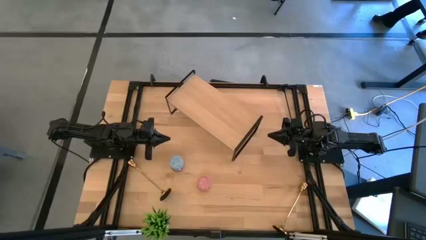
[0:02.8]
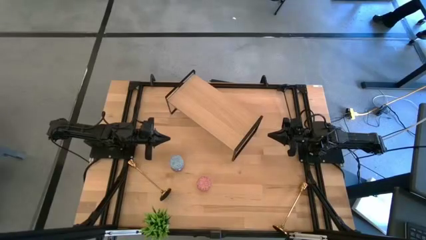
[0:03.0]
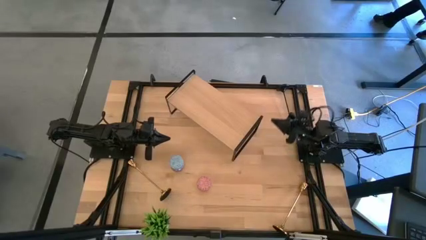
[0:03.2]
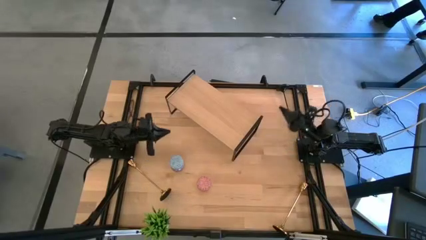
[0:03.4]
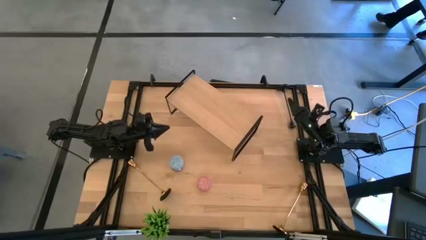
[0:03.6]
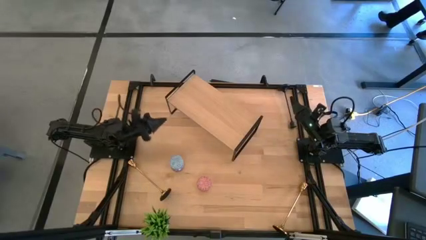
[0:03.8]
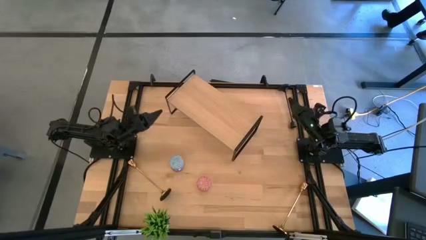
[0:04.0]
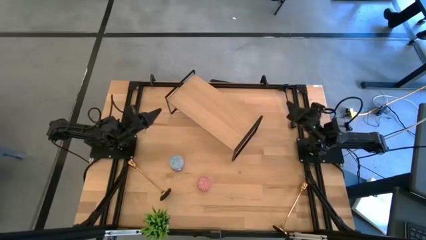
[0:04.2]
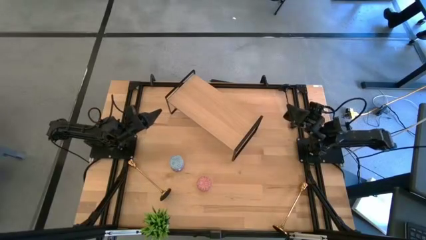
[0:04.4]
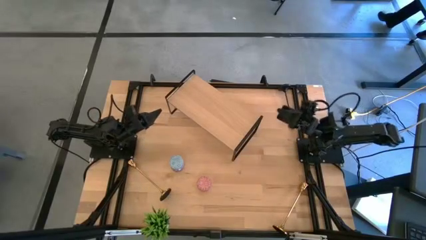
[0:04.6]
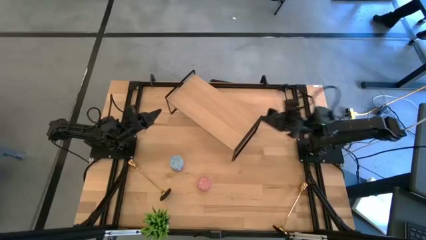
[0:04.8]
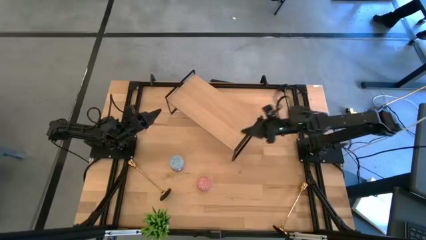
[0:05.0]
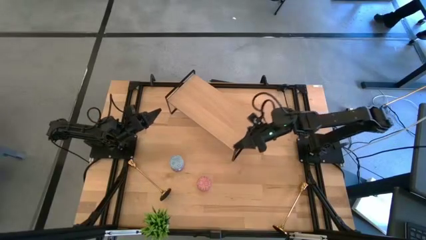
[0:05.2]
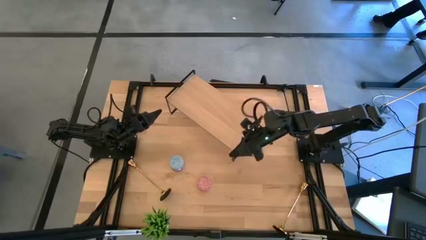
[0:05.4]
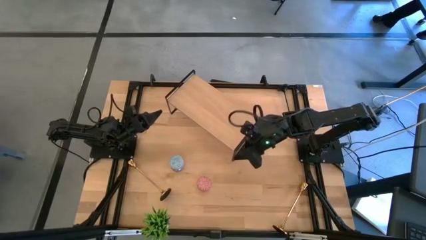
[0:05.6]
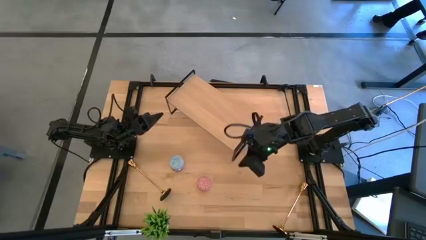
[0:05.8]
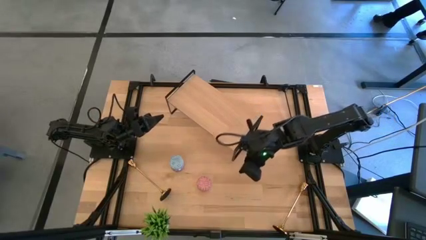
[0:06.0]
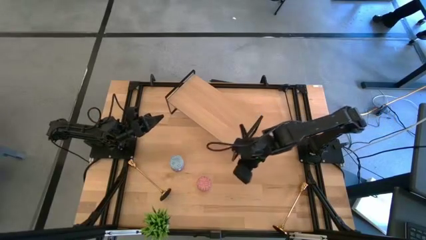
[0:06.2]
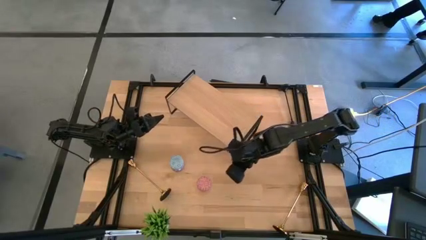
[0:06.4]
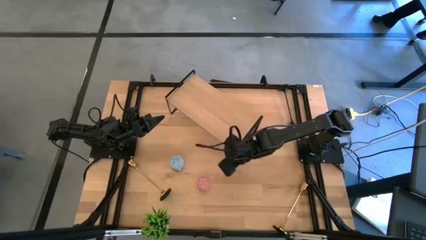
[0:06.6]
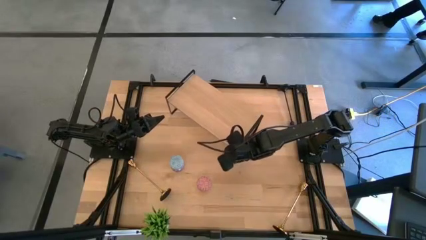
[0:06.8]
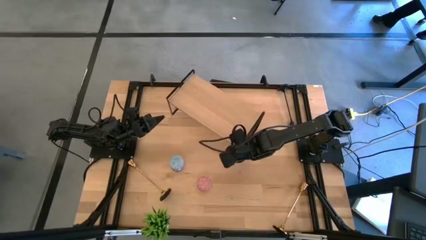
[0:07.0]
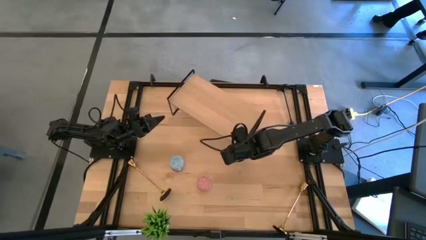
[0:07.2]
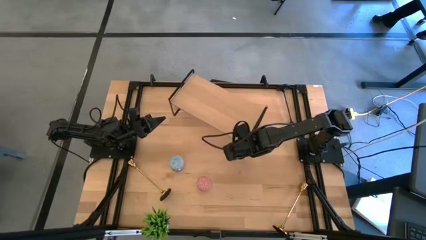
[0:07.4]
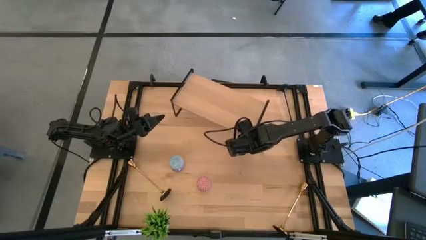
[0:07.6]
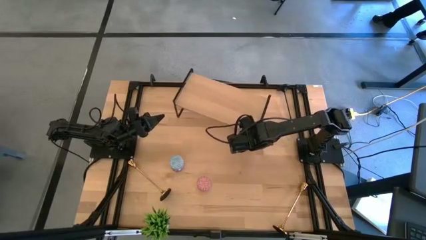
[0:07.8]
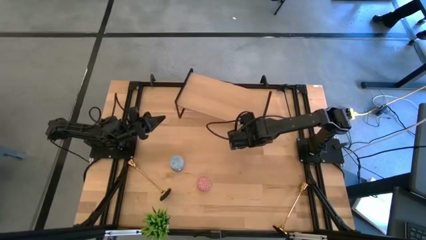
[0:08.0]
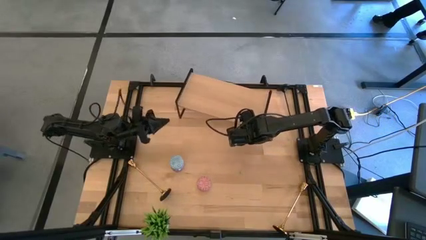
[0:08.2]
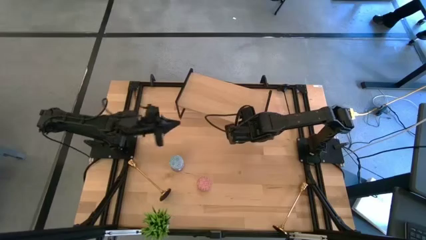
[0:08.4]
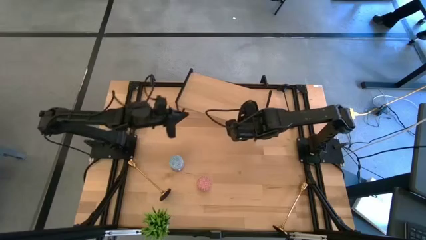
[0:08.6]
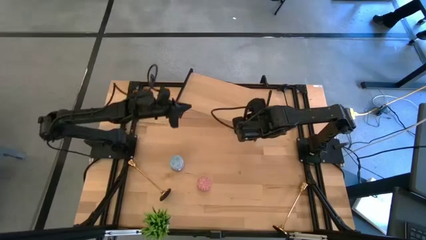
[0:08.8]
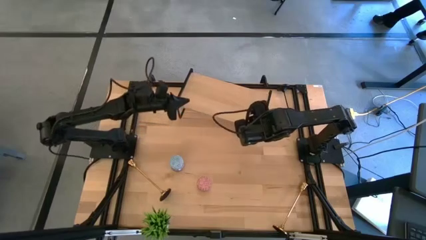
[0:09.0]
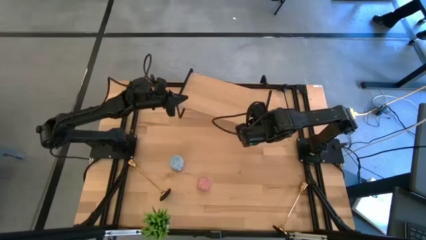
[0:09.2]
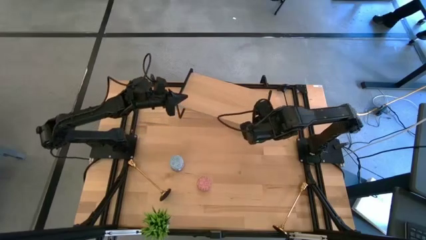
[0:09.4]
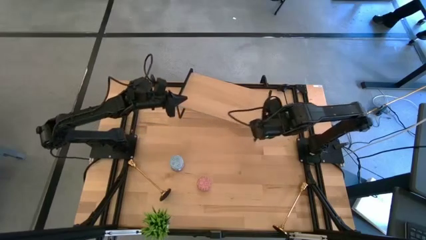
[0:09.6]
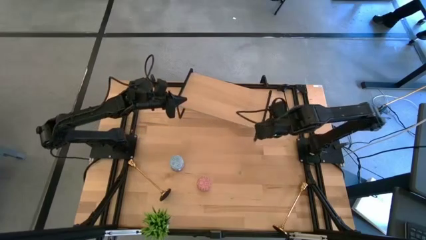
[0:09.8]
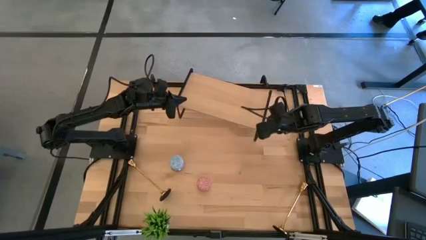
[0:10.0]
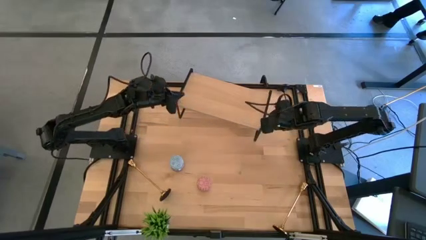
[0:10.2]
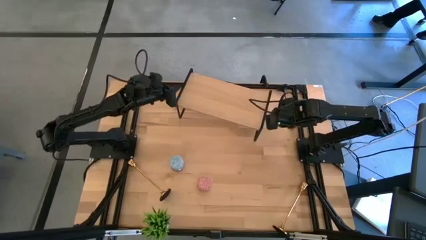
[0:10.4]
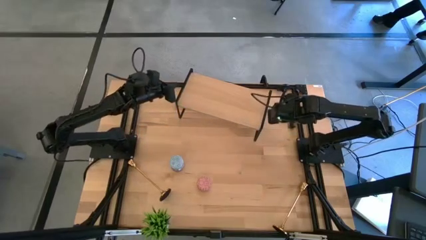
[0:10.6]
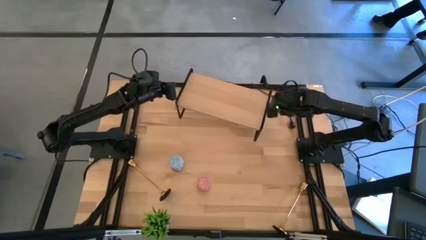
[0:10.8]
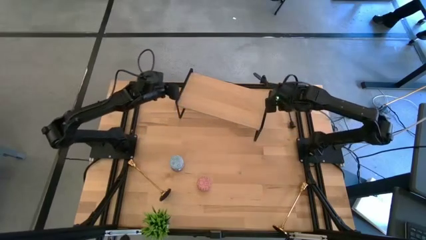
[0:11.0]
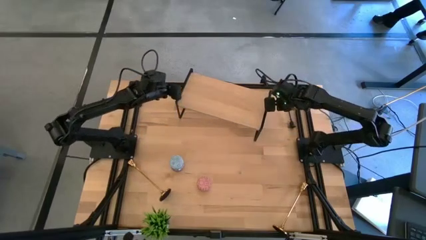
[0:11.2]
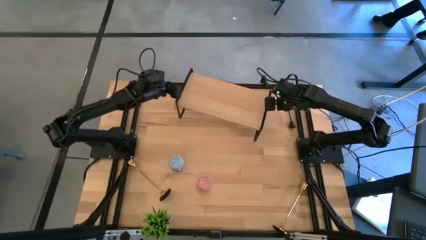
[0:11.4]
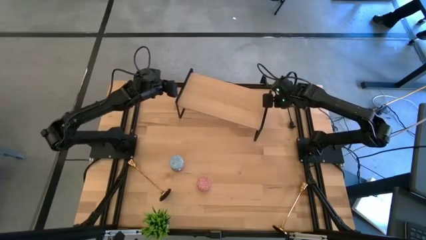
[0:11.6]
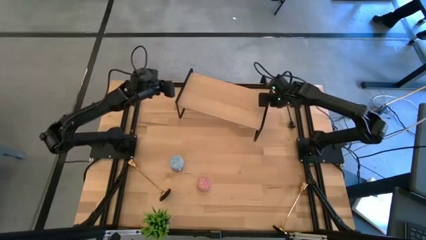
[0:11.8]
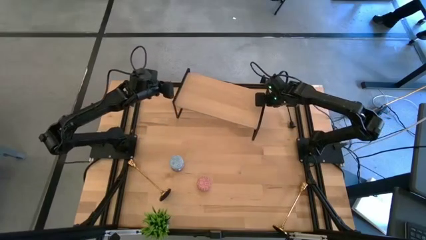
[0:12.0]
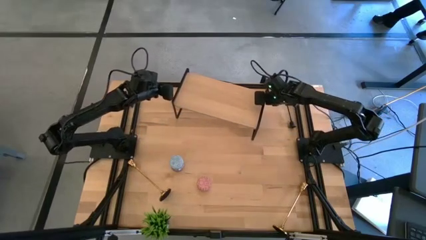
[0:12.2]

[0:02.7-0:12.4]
Task: Pick & Place candle stick holders
Adjust the shelf on the table

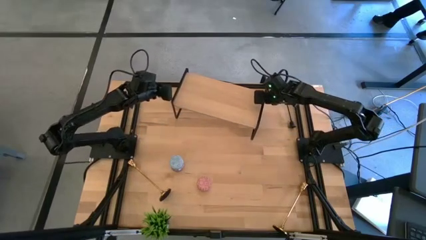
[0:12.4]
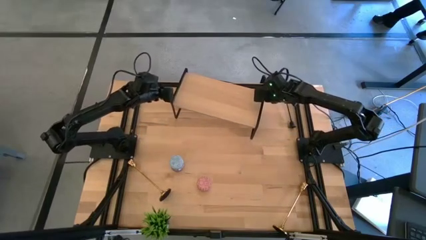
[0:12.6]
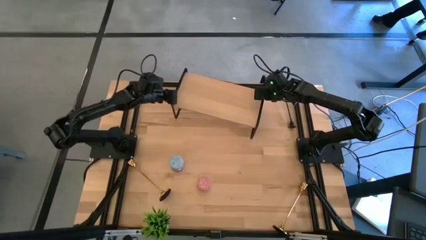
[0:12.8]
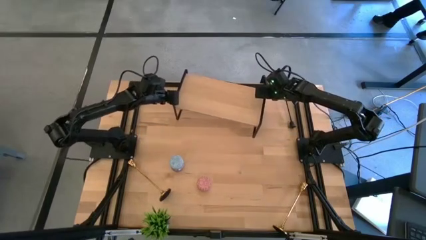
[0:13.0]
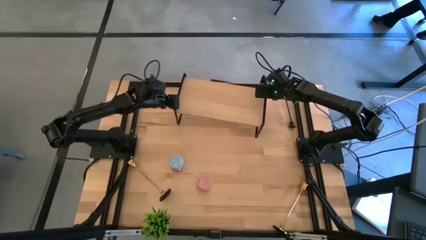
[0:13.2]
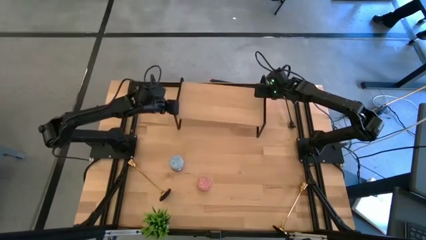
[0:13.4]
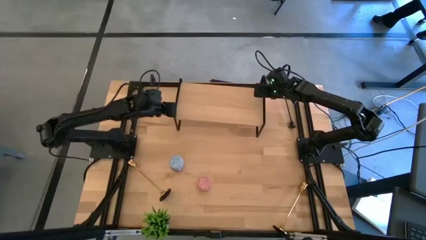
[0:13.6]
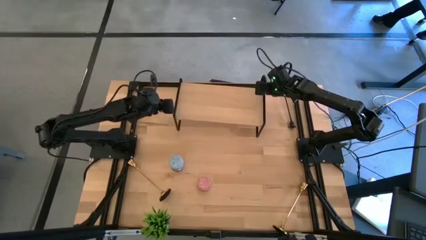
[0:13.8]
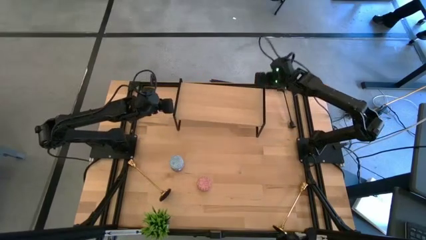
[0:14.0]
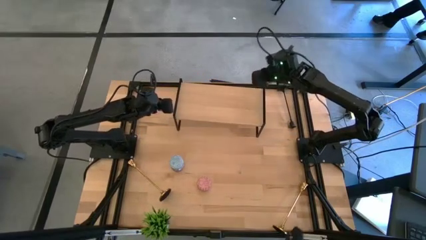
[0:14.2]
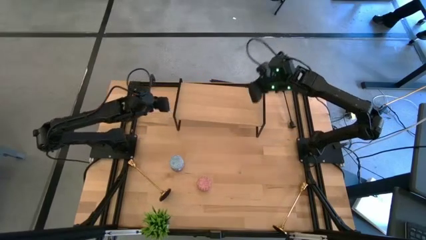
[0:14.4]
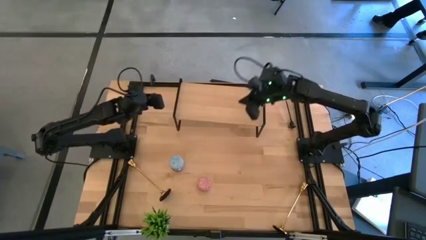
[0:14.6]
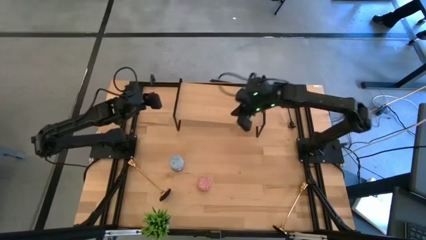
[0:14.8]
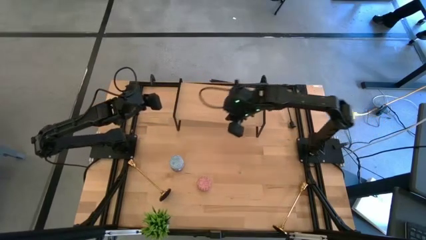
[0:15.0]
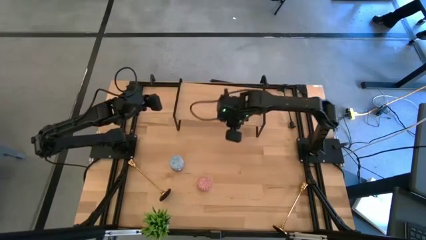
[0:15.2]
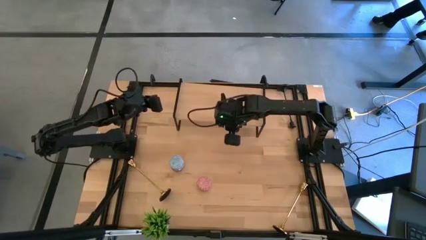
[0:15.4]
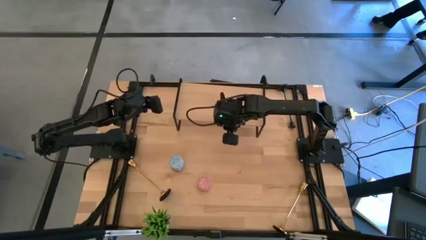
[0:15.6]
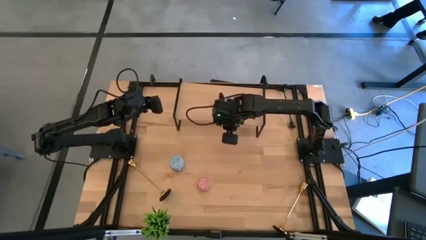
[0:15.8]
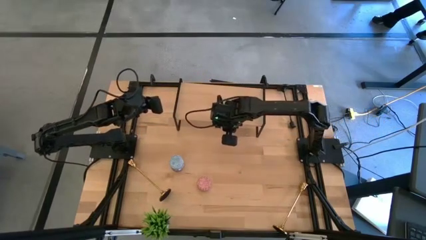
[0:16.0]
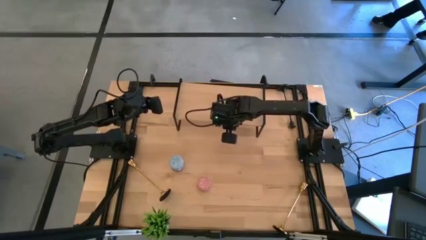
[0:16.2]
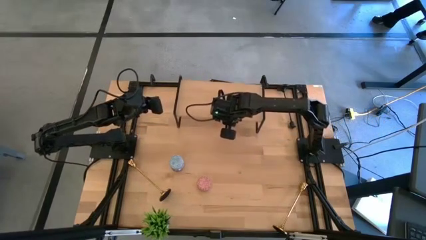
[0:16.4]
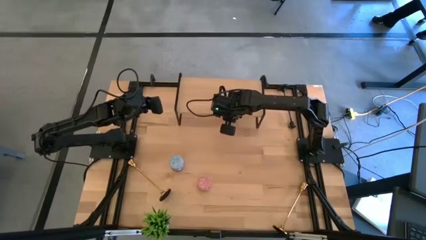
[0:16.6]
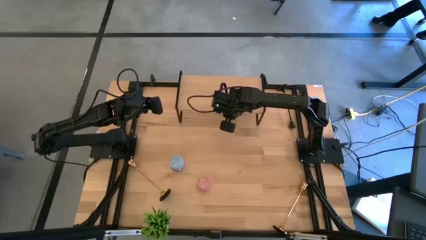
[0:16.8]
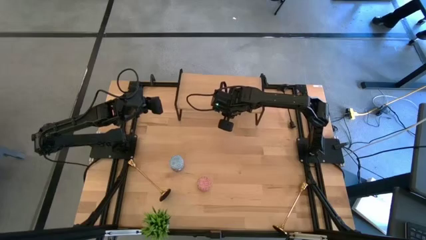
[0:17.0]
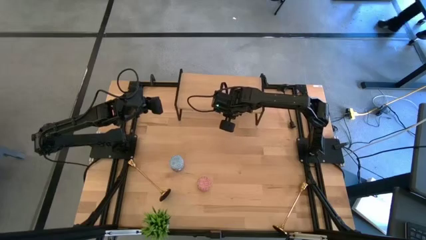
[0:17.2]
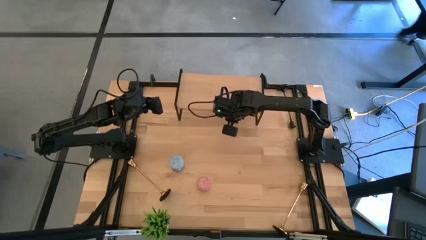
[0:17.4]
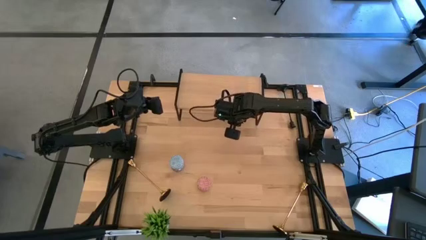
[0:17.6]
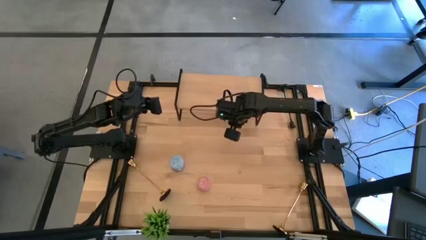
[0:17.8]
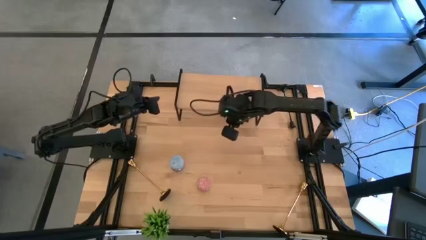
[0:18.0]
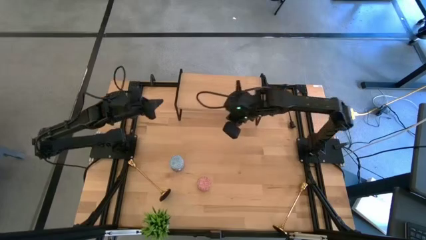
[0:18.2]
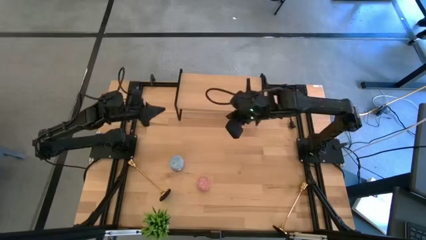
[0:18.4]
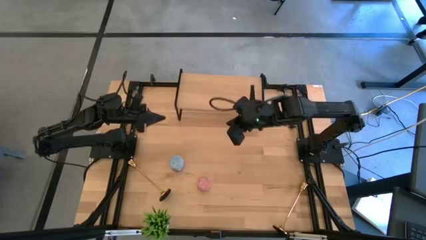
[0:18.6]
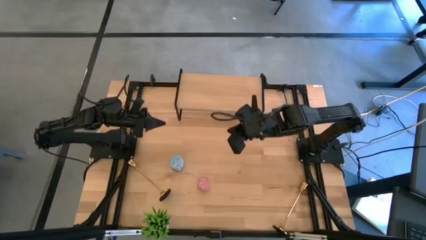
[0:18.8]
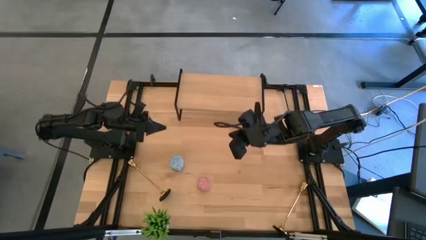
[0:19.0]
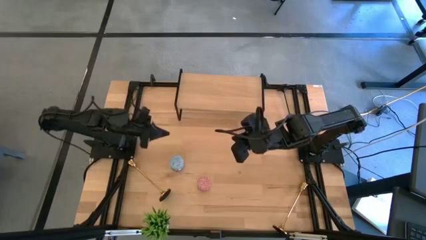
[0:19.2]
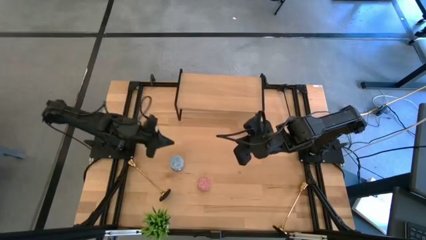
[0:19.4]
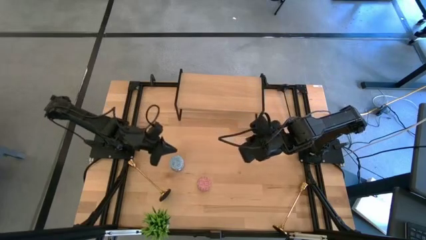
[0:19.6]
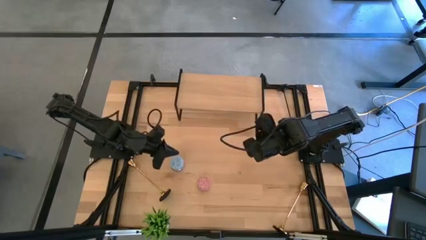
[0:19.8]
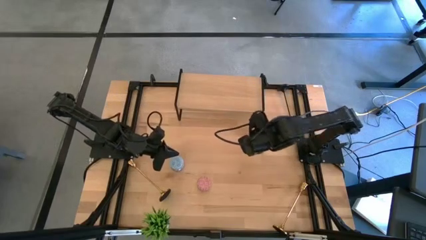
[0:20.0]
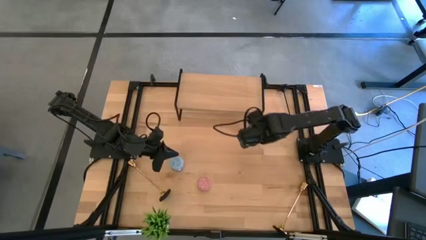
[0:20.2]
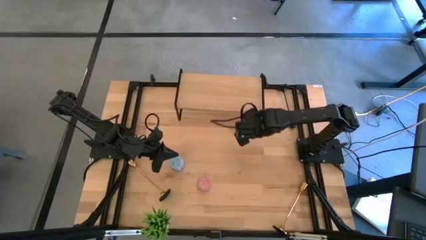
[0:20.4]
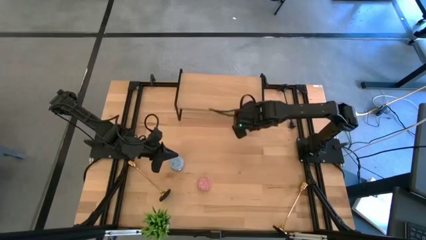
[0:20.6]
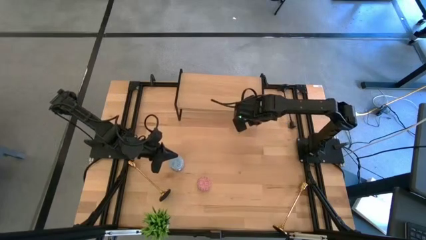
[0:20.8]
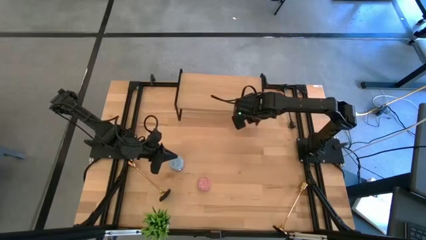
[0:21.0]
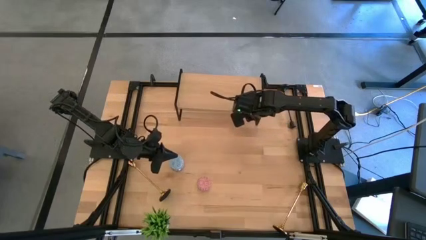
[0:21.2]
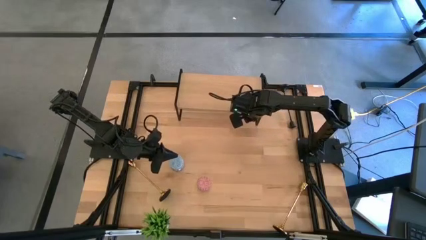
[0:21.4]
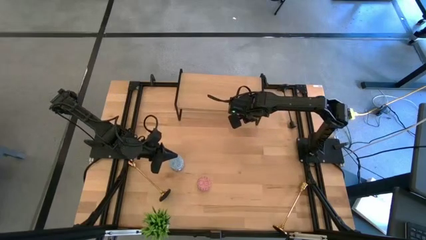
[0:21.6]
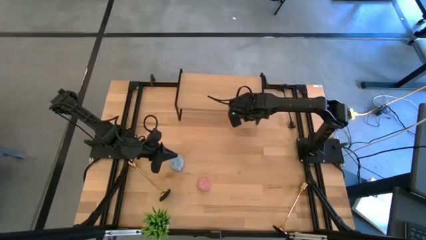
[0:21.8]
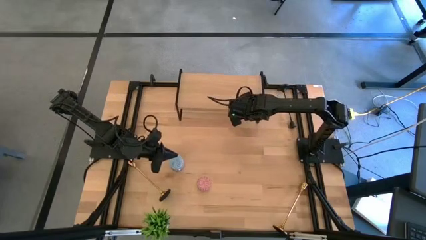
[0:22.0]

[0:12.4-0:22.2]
Adjust the shelf on the table
